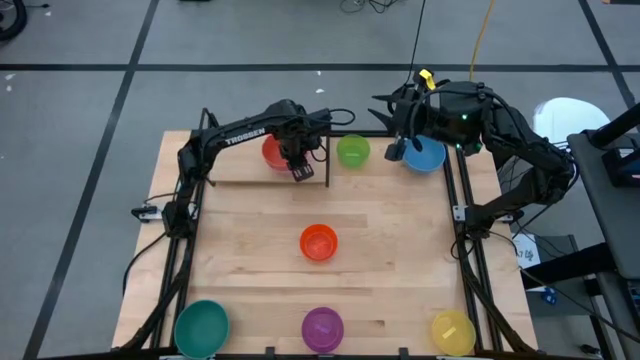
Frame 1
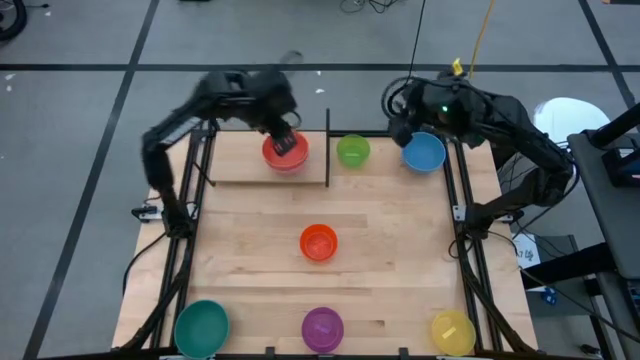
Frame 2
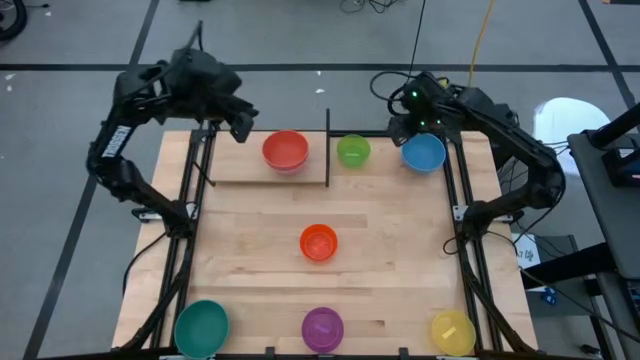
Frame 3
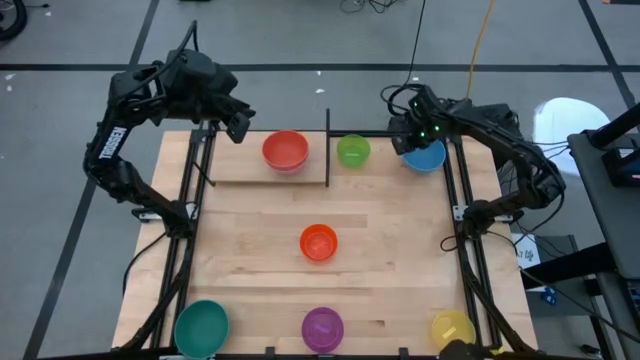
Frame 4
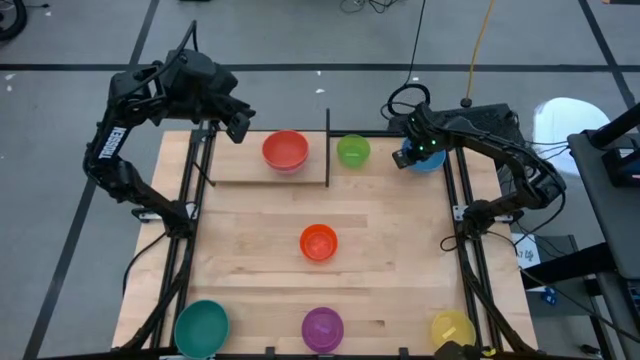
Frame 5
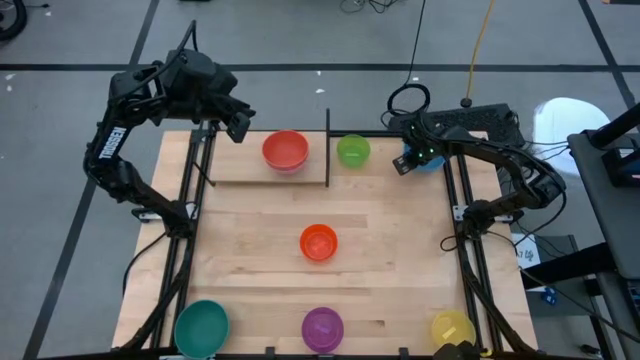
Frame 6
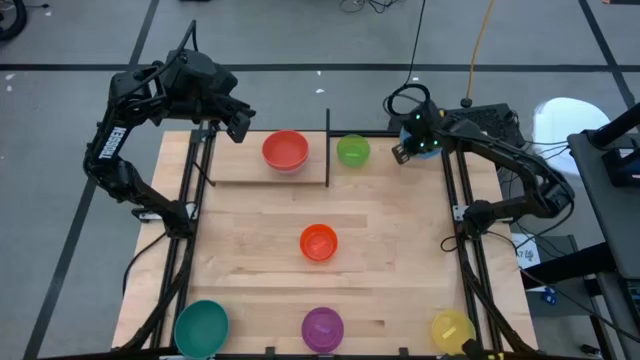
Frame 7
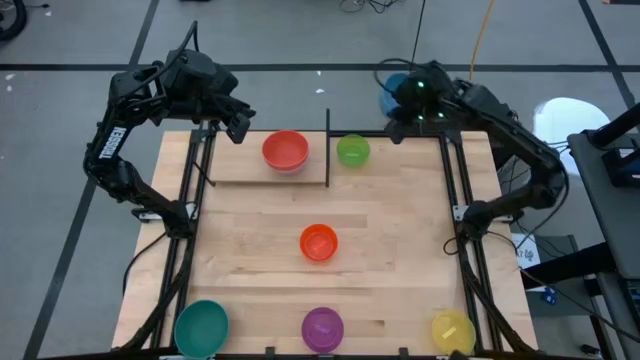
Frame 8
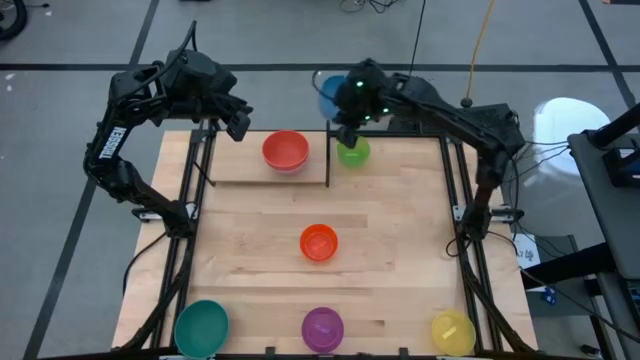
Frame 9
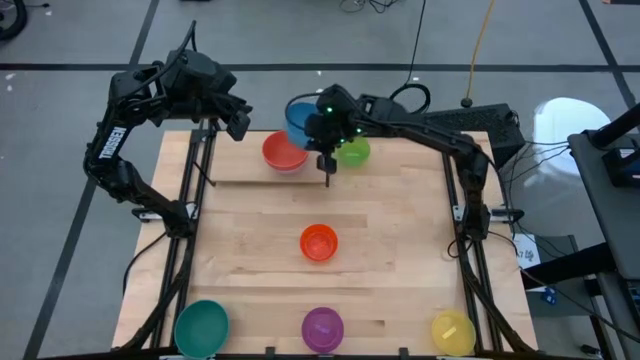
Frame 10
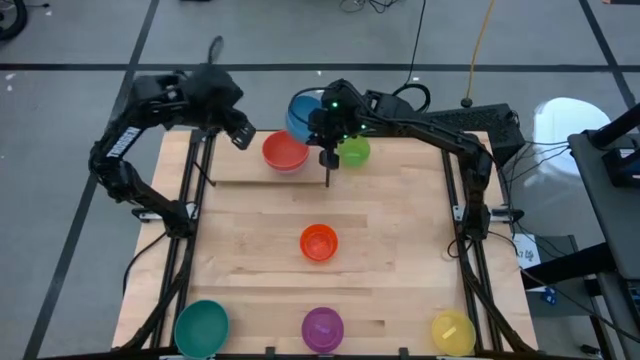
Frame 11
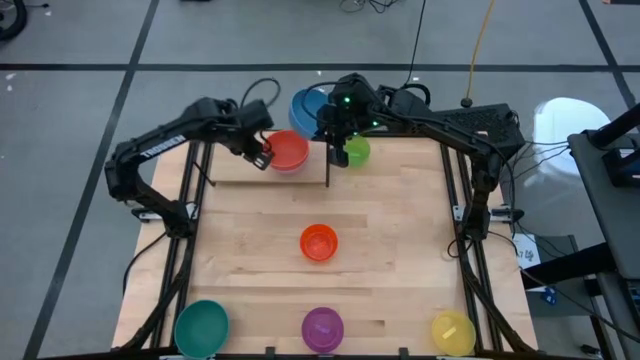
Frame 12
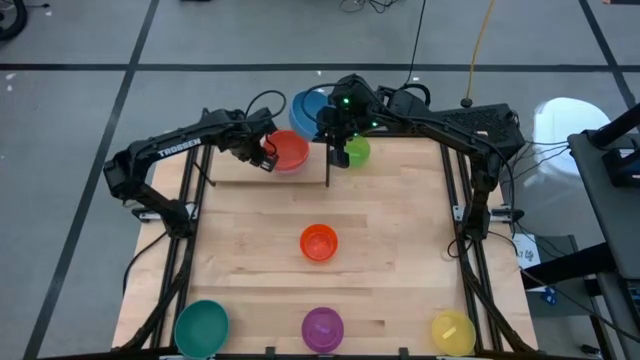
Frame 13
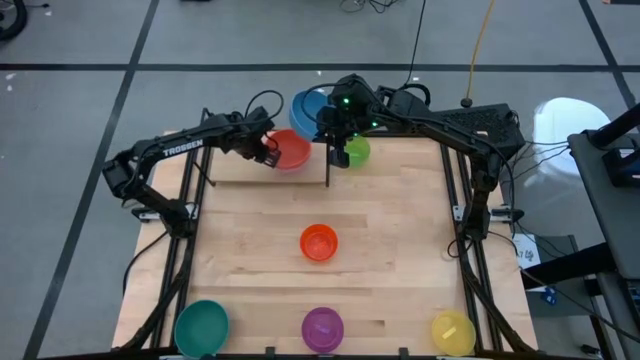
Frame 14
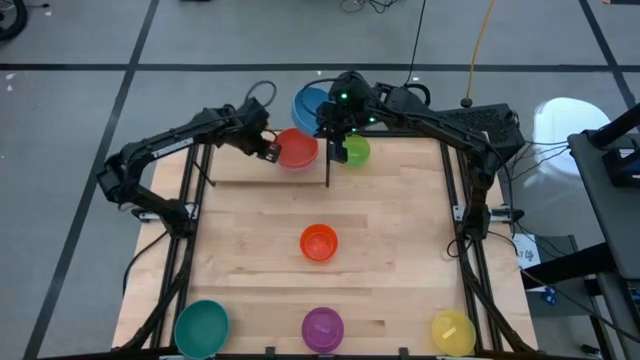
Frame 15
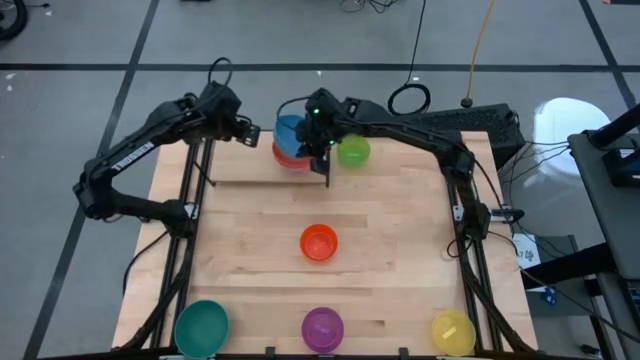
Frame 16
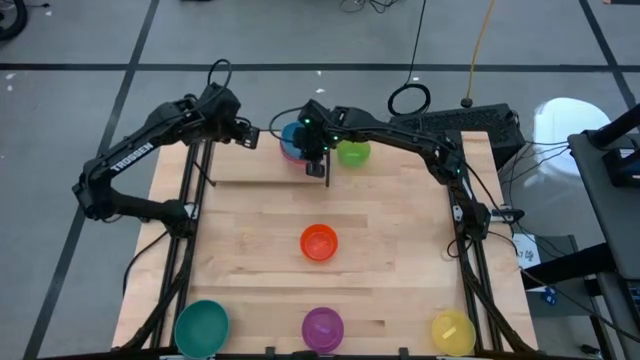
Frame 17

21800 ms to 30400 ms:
Task: Place and stack bowls onto a shelf
Stack the blue bowl on the red bowl on the shelf

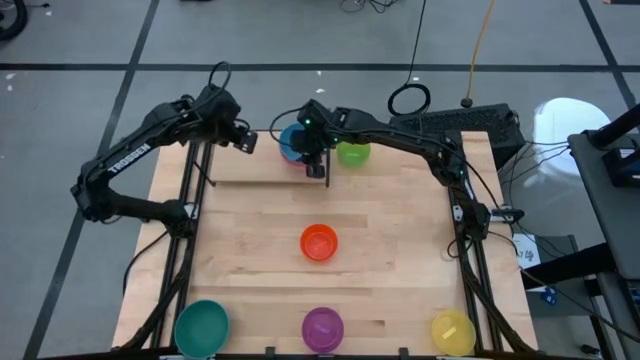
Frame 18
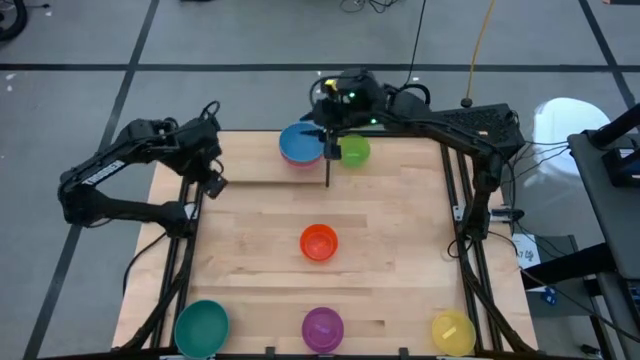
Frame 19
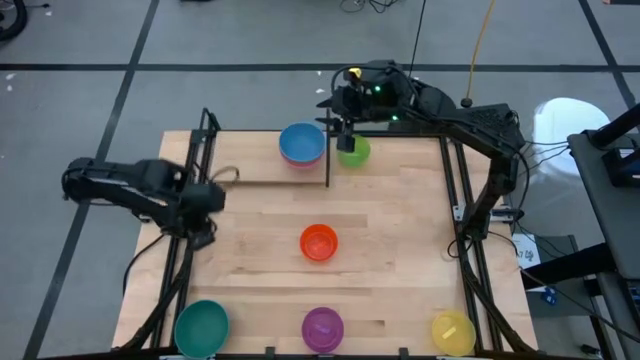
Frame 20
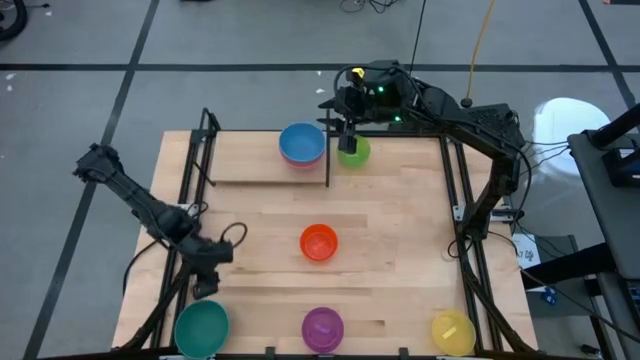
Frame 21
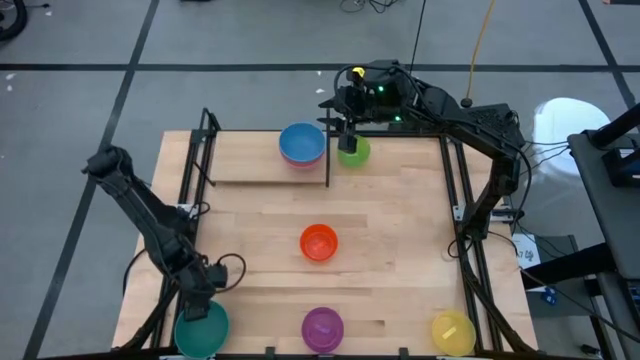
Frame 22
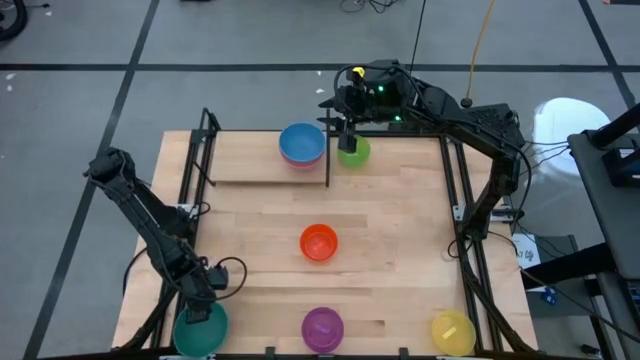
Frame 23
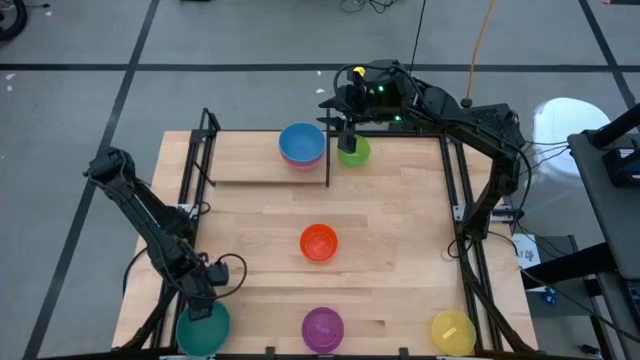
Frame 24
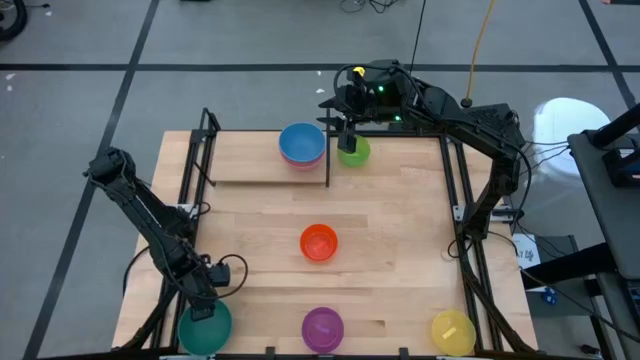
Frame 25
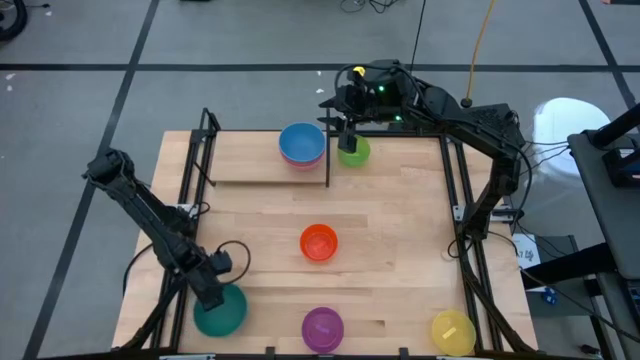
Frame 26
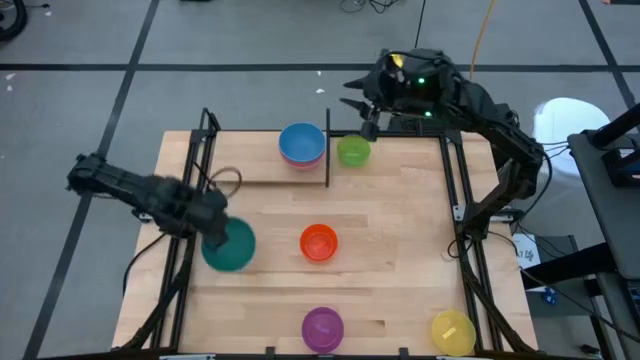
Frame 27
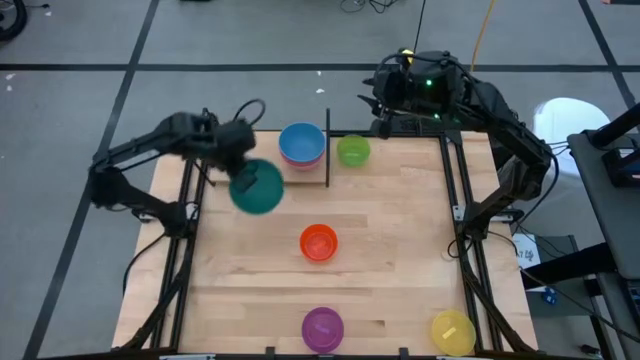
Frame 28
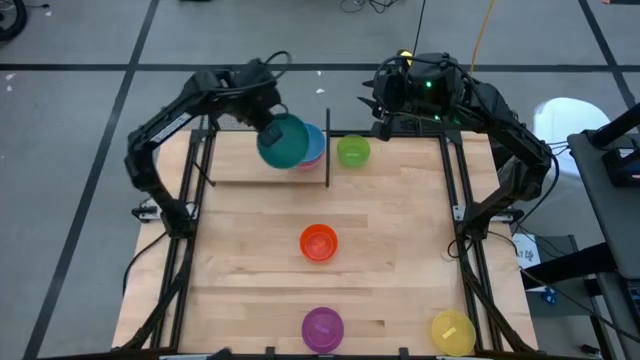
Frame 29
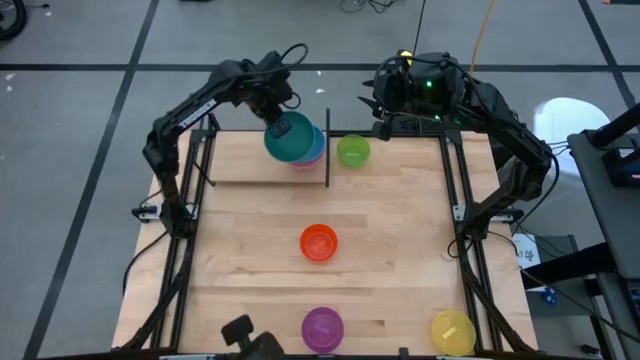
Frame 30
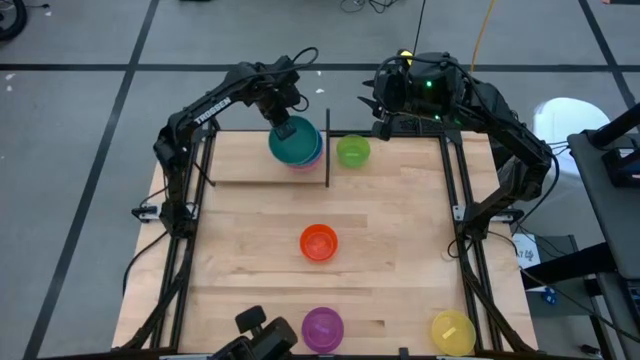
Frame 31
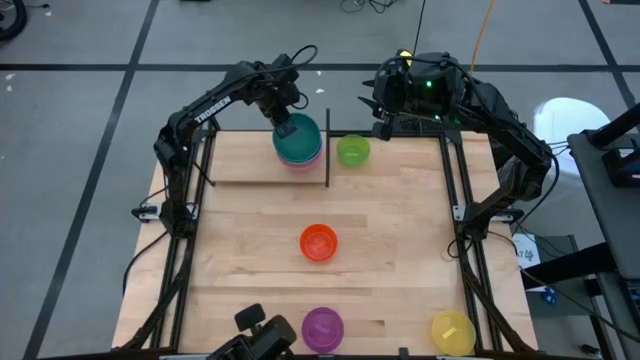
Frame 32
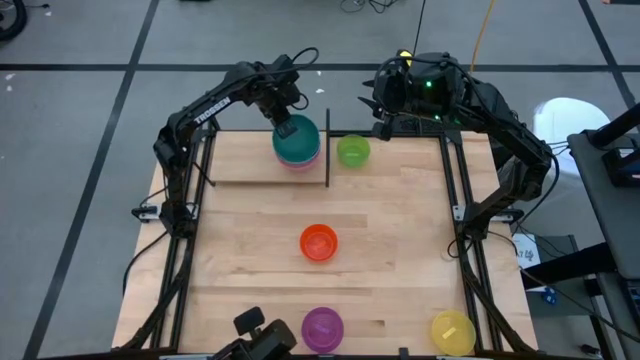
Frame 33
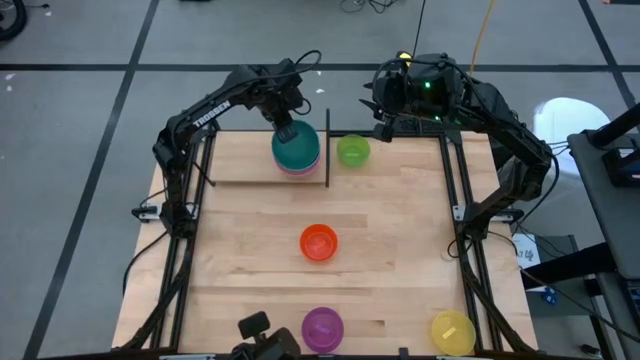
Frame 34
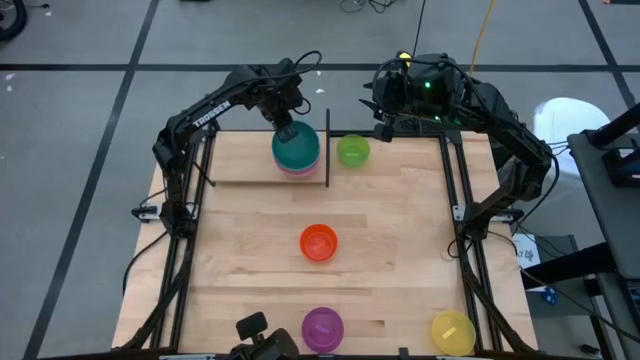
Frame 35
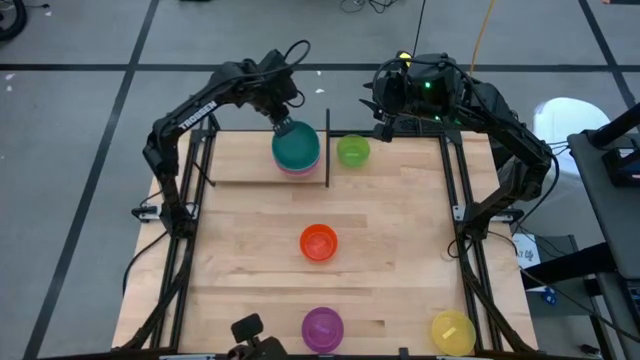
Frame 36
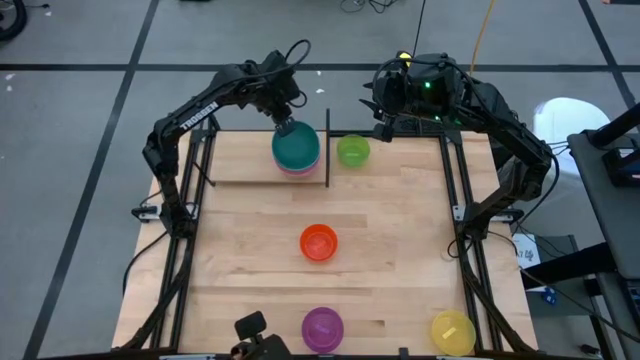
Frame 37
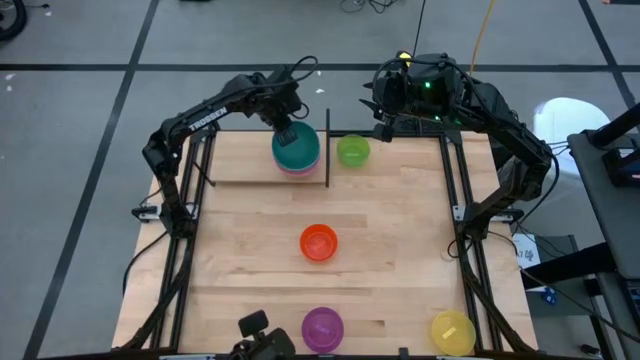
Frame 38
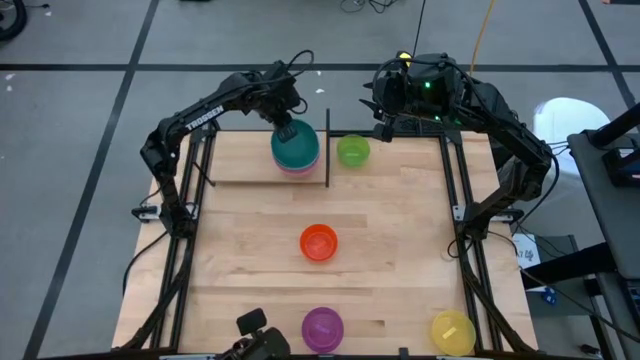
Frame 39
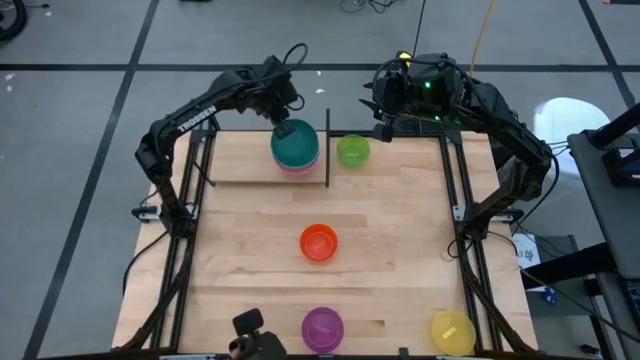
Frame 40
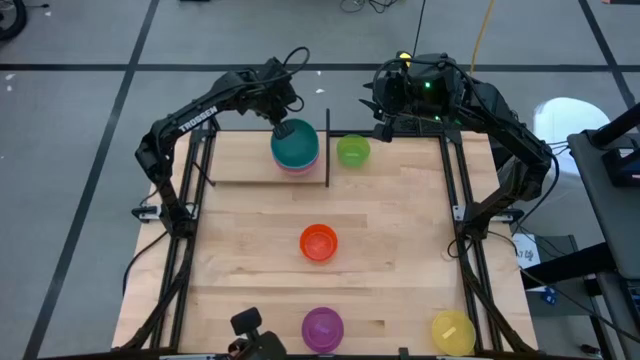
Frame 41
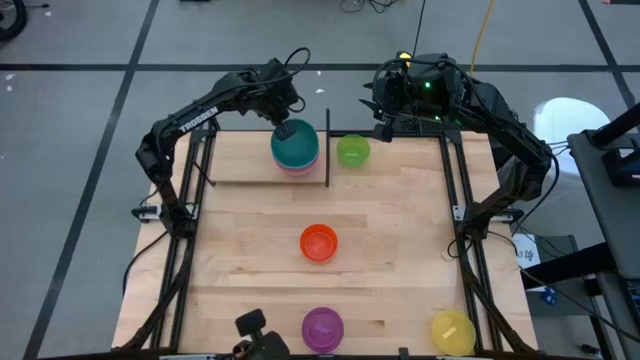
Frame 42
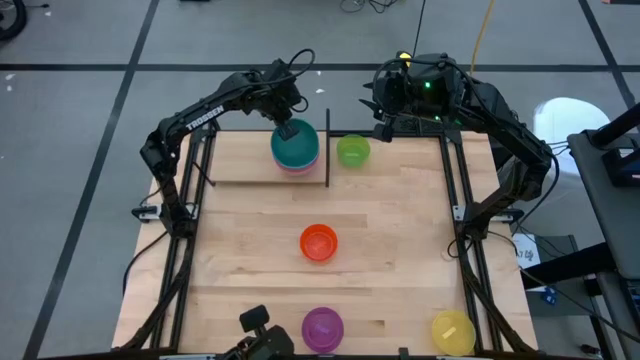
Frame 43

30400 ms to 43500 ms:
Stack the dark green bowl on the blue bowl on the shelf
